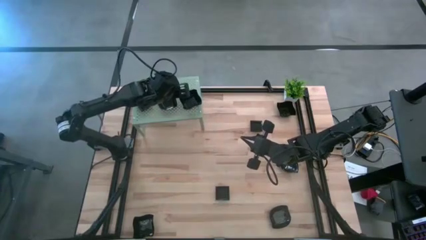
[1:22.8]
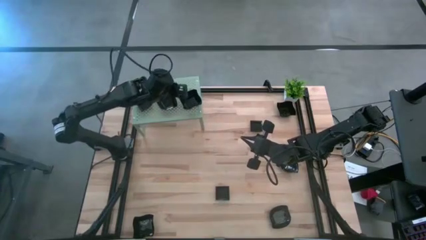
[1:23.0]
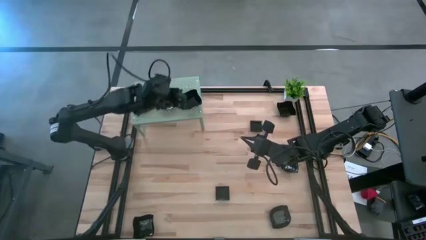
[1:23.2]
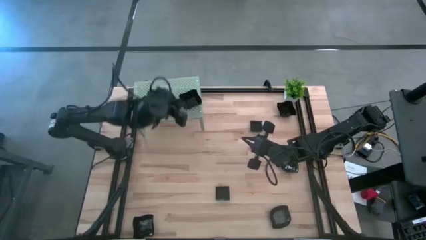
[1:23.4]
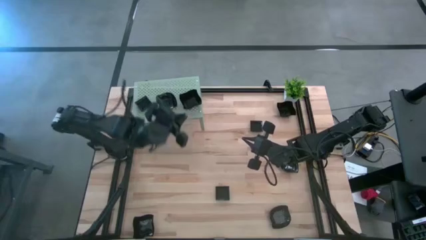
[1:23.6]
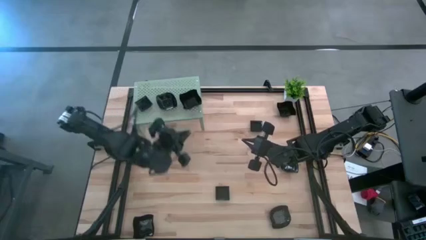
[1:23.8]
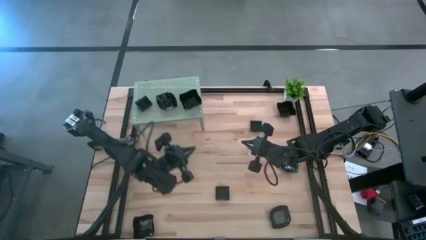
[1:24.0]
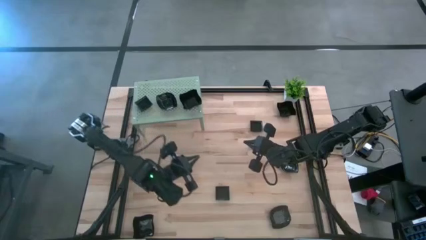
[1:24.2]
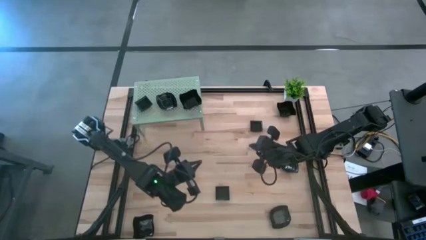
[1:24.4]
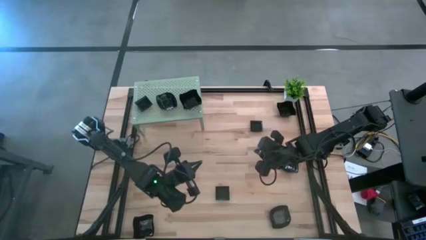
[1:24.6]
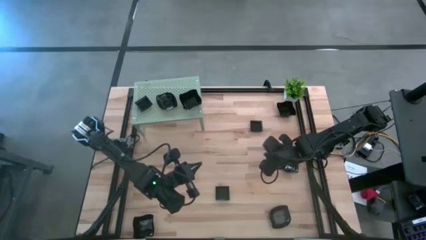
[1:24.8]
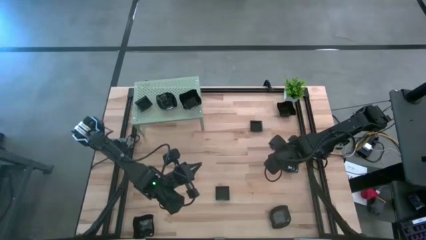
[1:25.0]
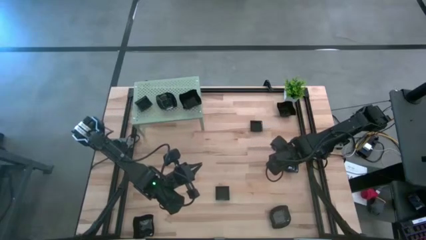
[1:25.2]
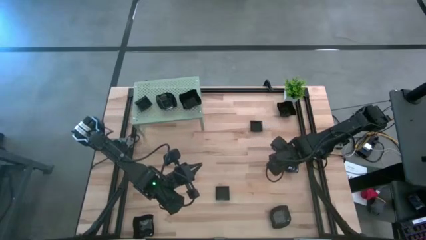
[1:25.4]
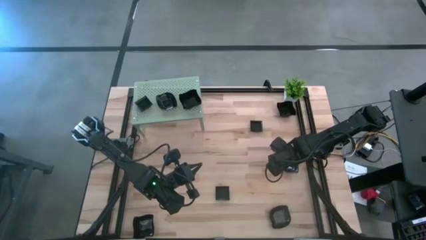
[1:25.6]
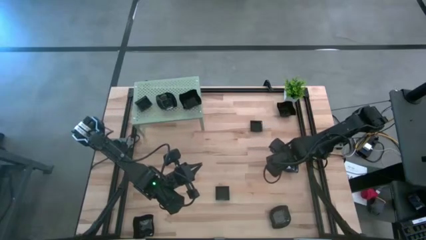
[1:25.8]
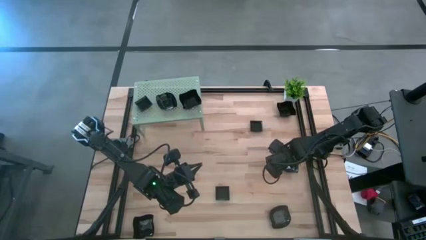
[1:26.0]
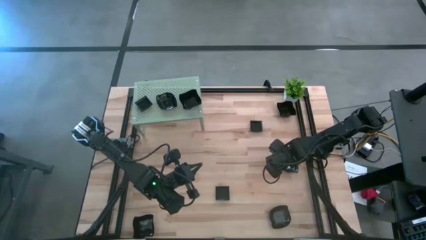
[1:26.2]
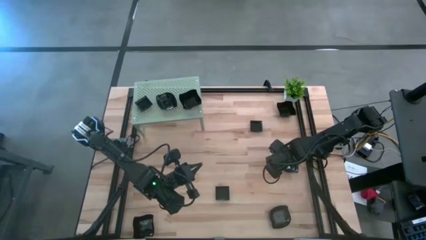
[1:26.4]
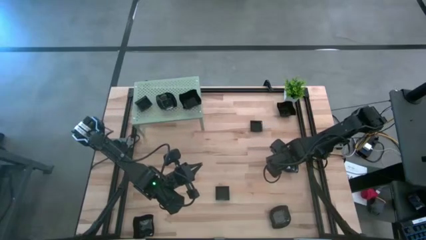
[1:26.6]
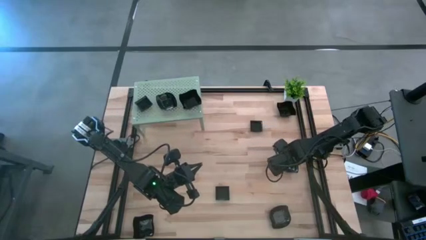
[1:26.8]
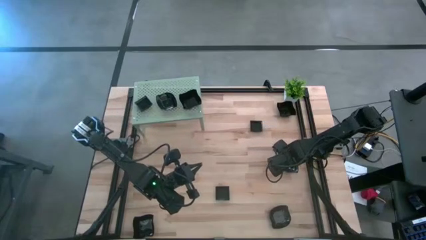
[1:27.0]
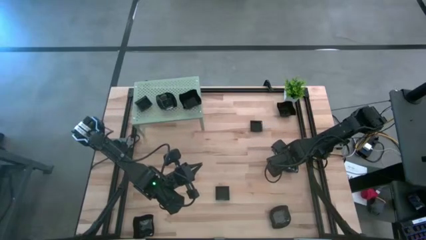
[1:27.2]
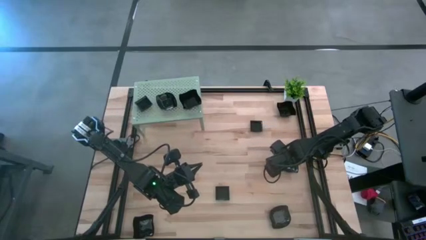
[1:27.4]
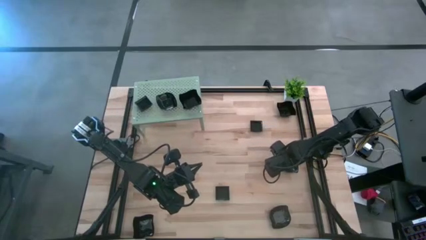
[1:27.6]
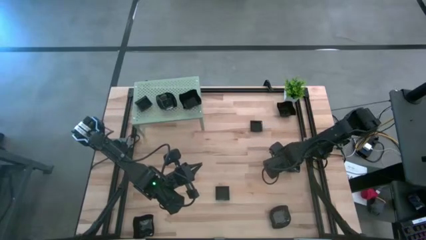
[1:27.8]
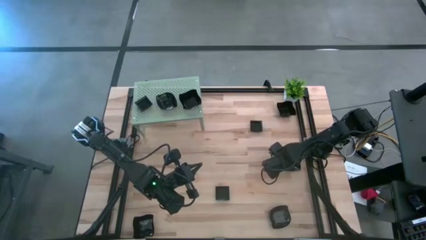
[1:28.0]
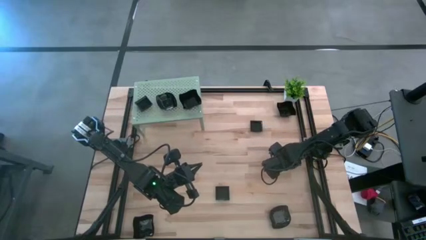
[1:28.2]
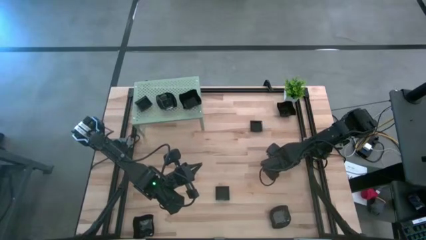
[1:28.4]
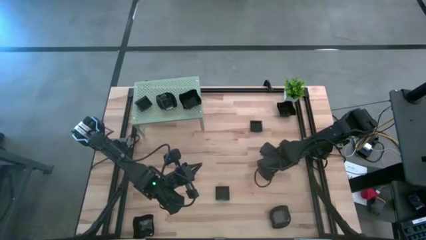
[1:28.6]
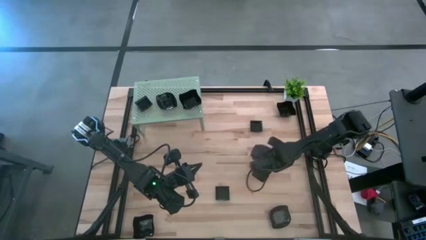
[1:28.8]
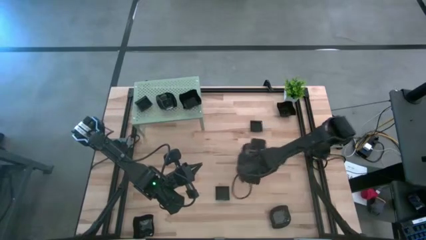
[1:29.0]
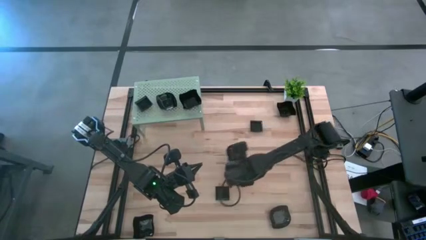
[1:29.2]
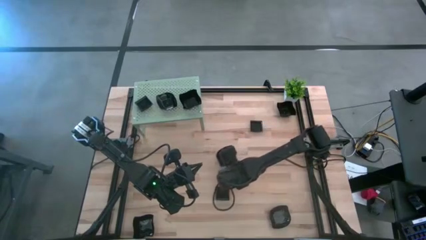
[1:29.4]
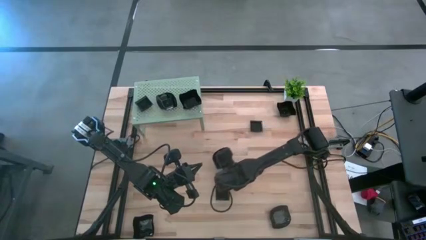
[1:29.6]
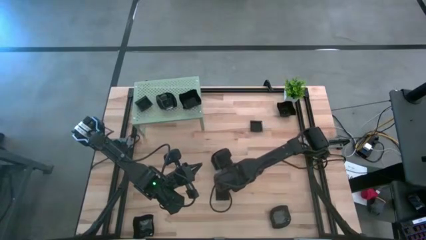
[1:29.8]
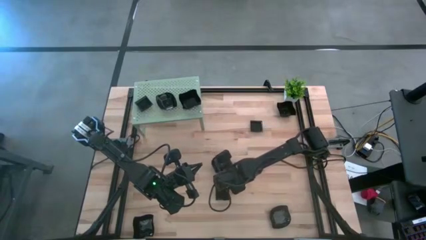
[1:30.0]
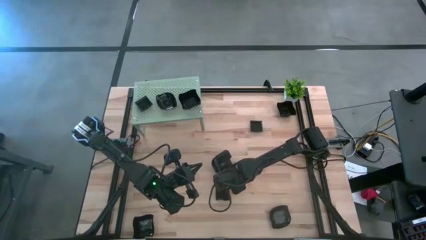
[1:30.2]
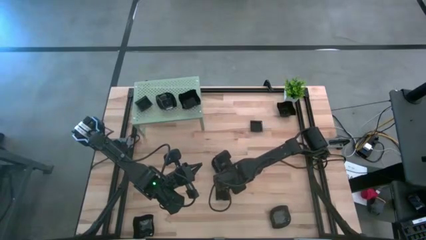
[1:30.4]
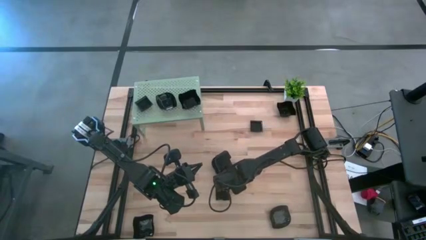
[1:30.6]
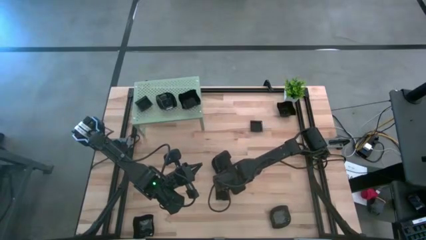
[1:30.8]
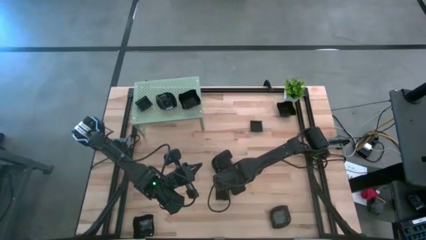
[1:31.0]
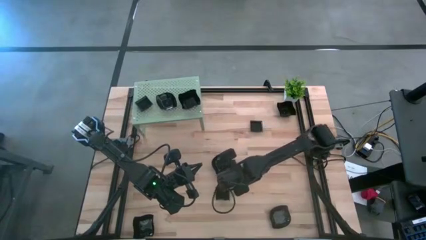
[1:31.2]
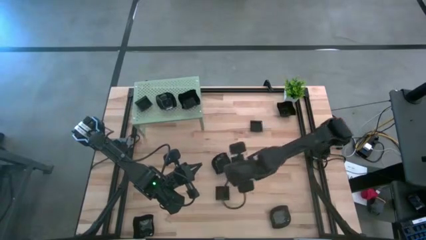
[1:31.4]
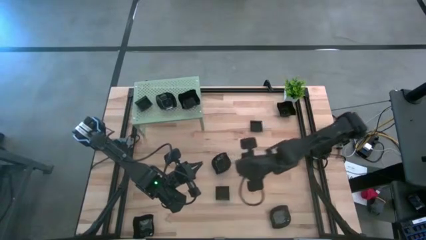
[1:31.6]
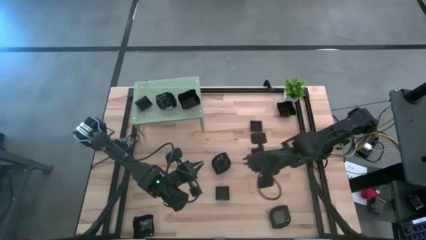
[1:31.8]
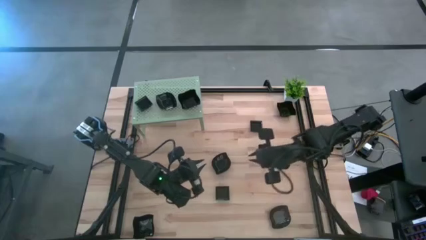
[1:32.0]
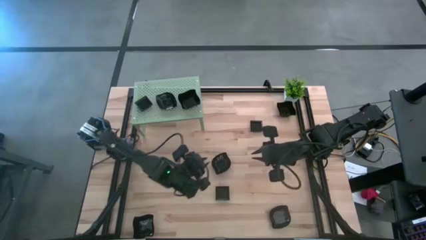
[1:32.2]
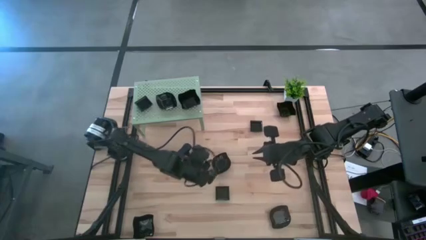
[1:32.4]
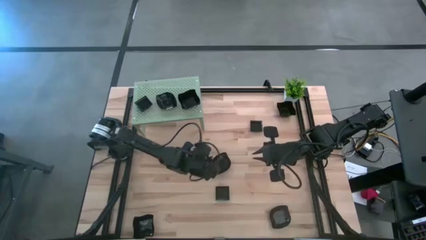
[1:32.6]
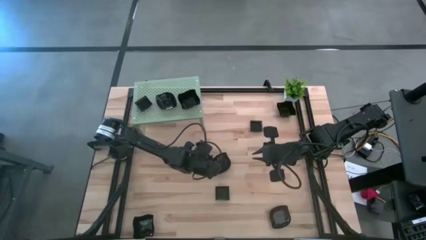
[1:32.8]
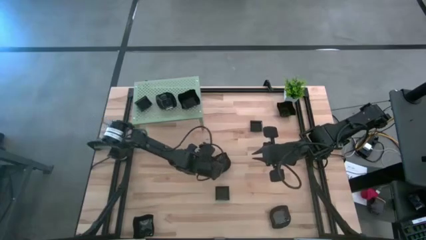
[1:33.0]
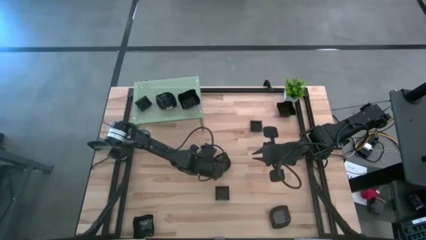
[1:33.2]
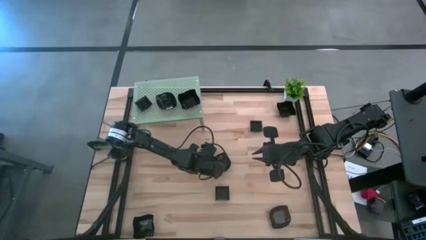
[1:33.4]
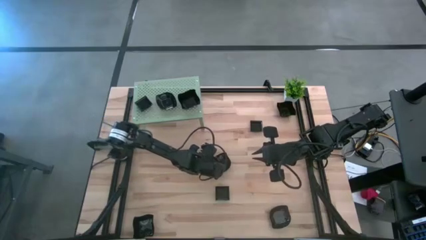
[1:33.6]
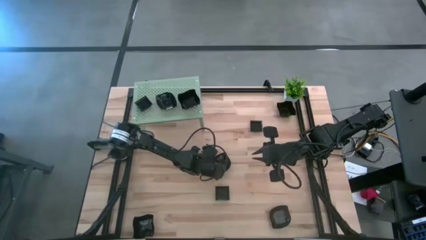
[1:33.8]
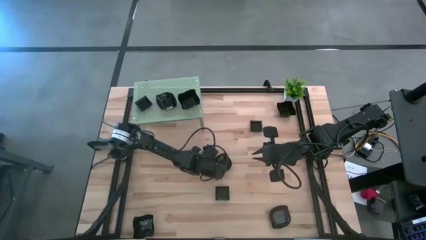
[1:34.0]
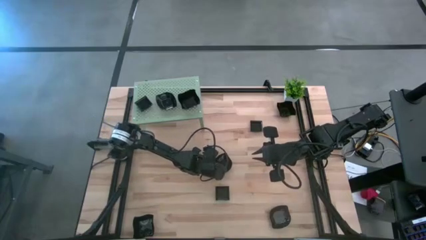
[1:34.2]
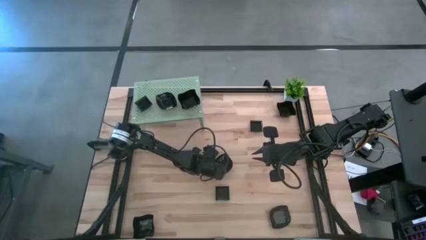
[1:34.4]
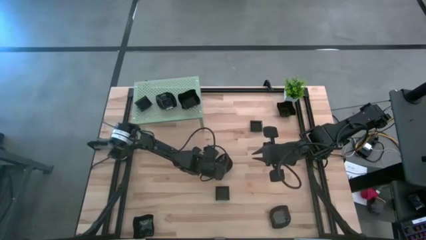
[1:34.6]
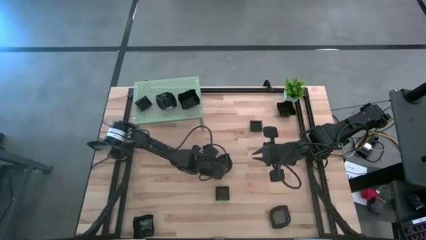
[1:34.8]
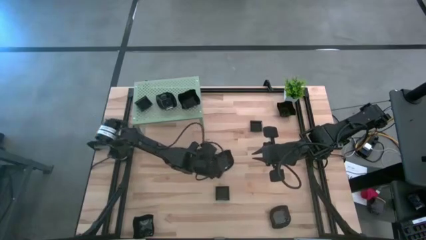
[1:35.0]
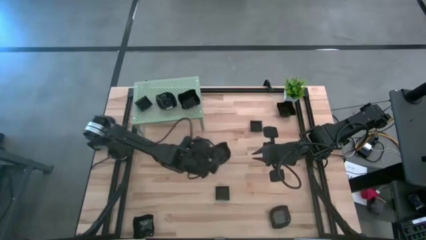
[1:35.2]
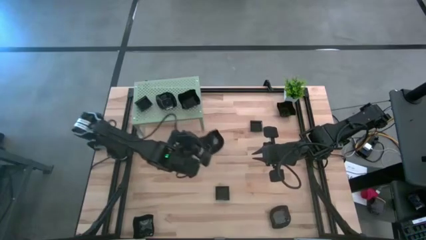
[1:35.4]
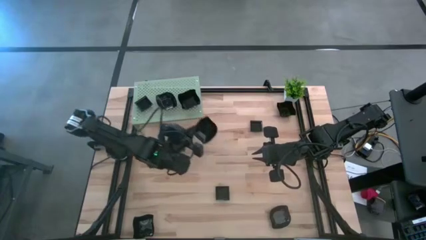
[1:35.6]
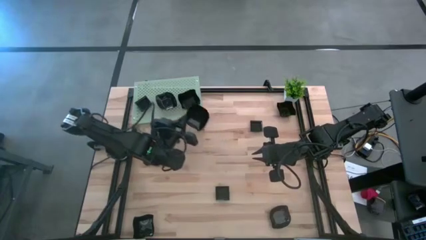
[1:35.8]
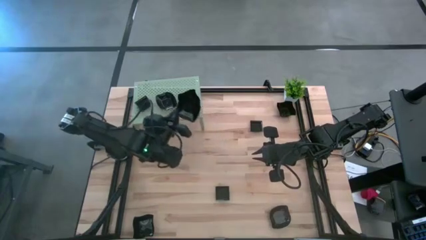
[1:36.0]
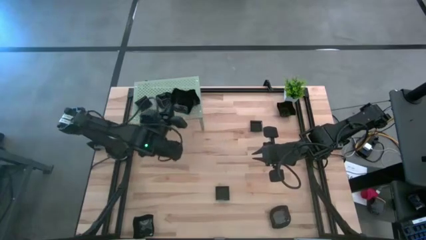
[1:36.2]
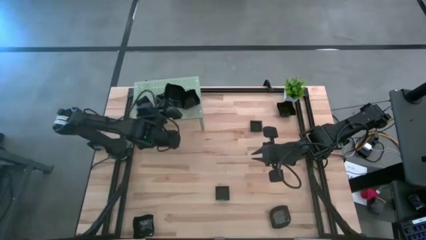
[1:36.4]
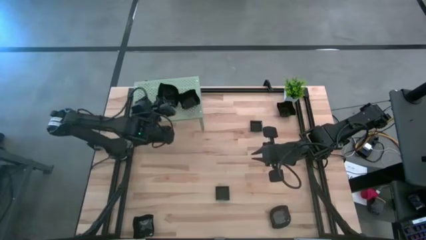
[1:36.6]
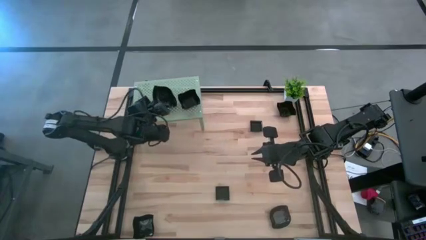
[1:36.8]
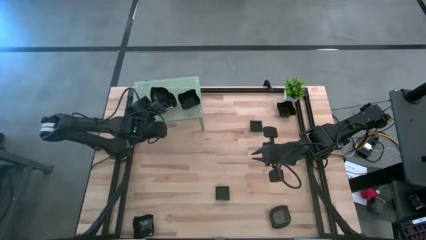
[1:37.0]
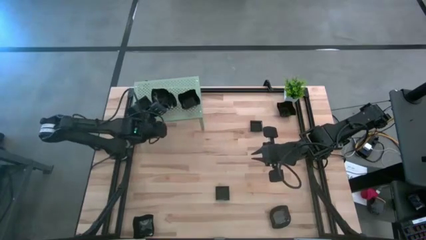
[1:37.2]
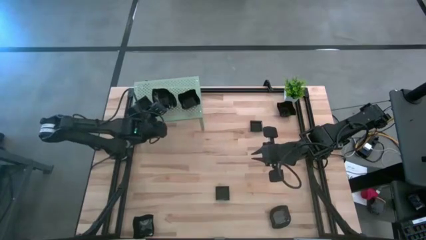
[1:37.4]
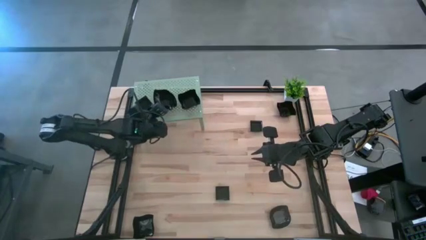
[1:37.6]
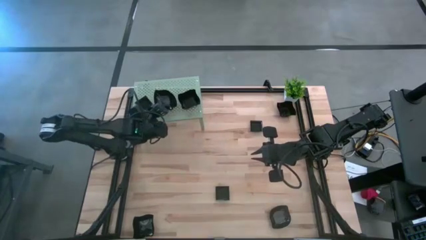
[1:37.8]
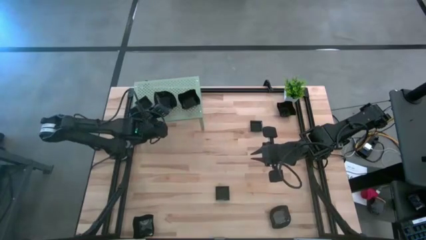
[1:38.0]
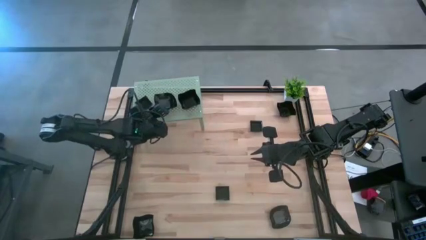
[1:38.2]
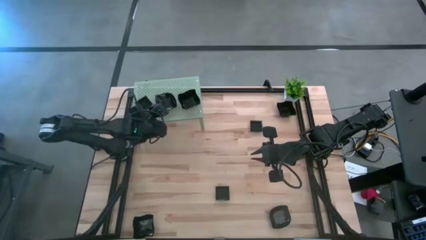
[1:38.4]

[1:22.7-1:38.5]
Task: Pick & Place Mini shaped plates
Stack the black leaf shaped plate on top of the leaf shaped plate on the shelf
